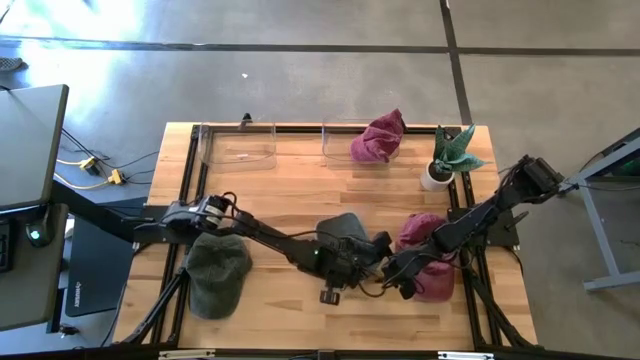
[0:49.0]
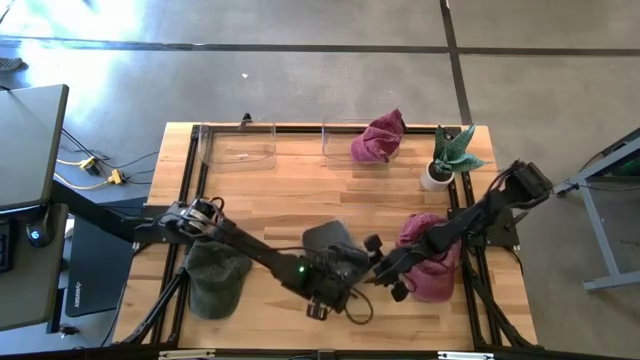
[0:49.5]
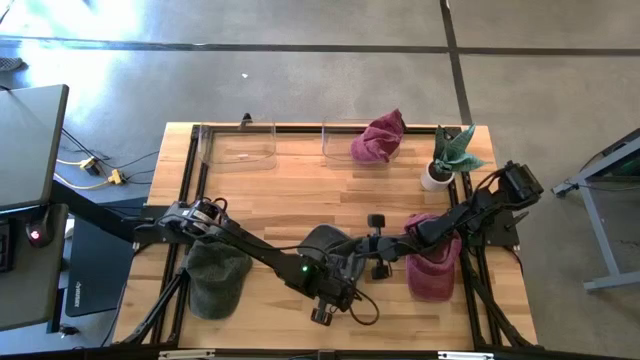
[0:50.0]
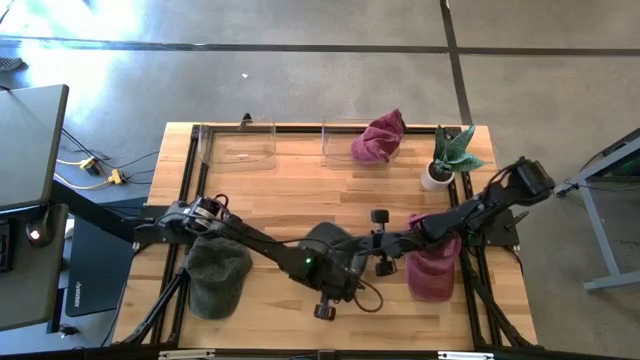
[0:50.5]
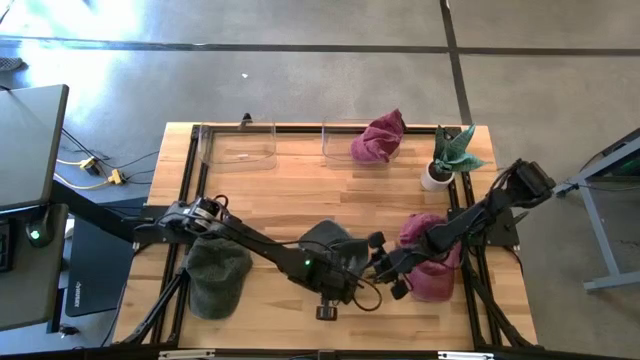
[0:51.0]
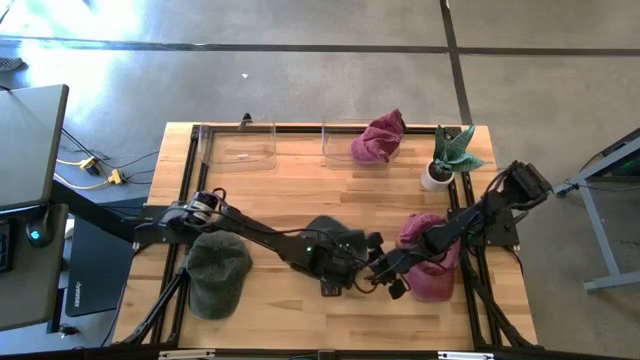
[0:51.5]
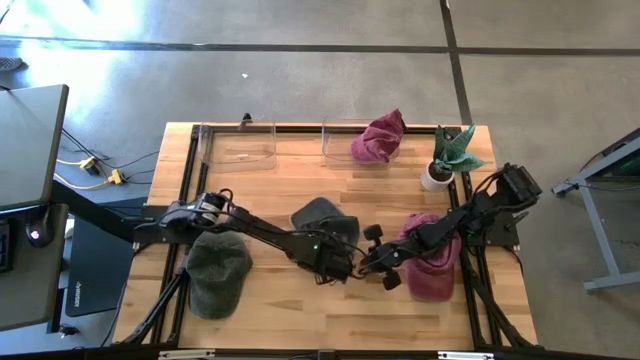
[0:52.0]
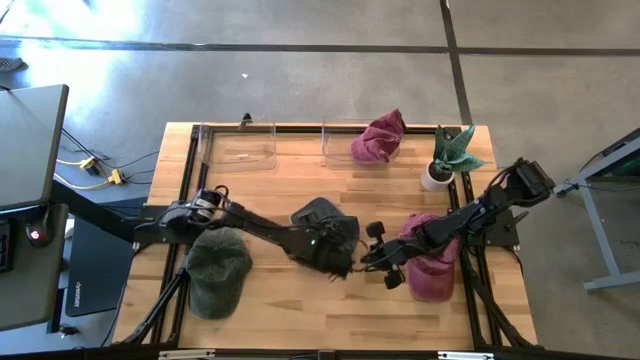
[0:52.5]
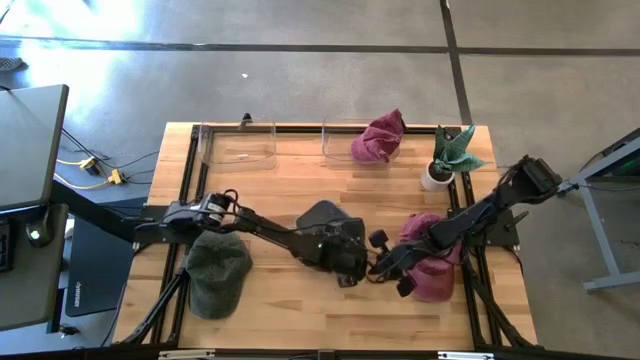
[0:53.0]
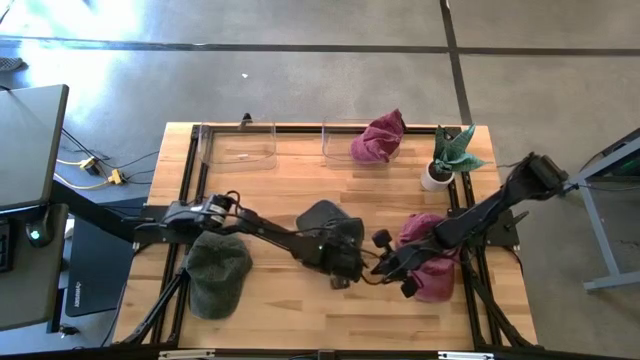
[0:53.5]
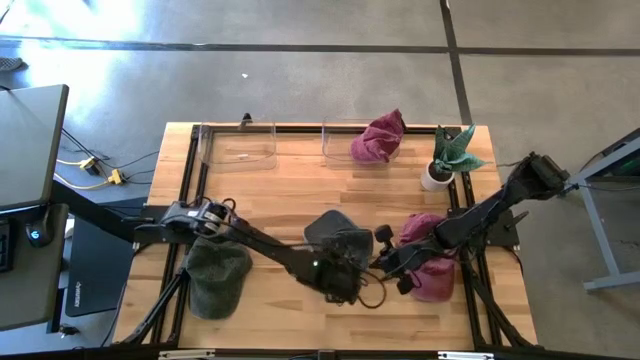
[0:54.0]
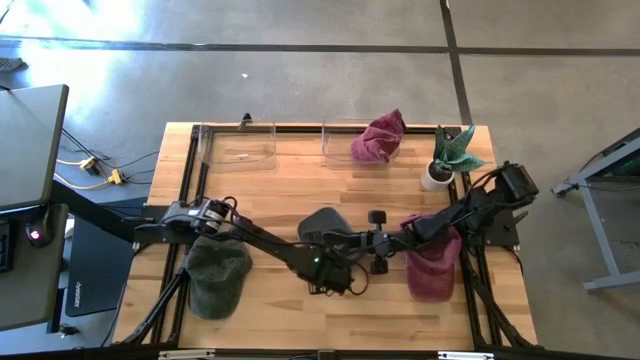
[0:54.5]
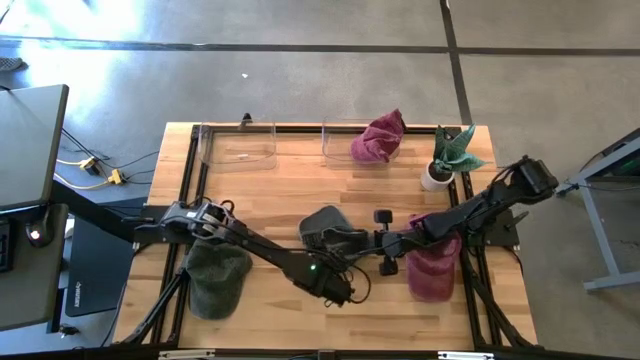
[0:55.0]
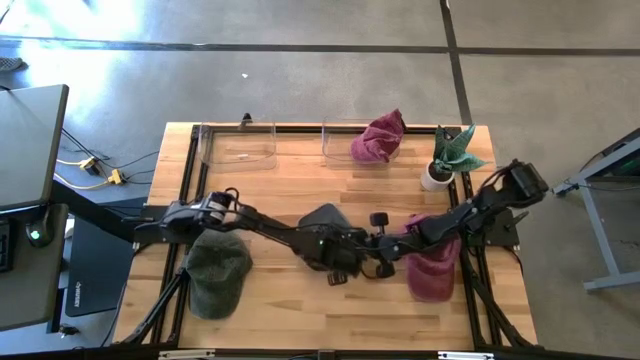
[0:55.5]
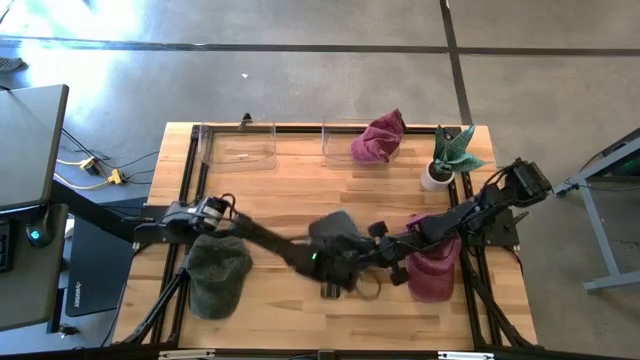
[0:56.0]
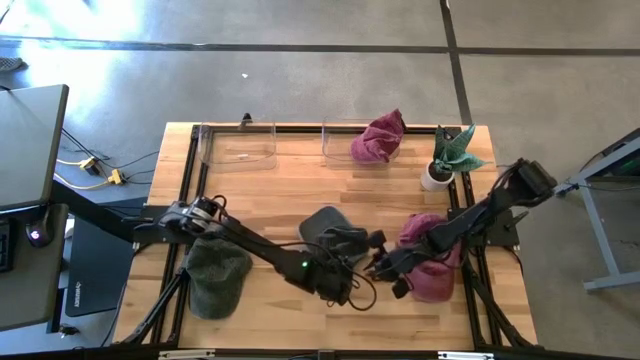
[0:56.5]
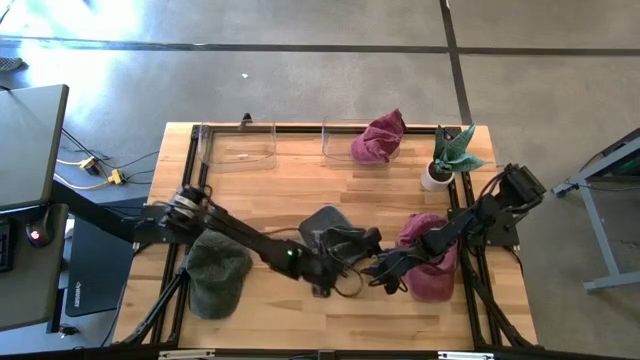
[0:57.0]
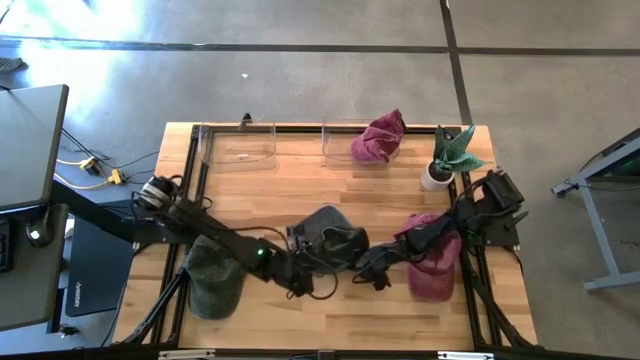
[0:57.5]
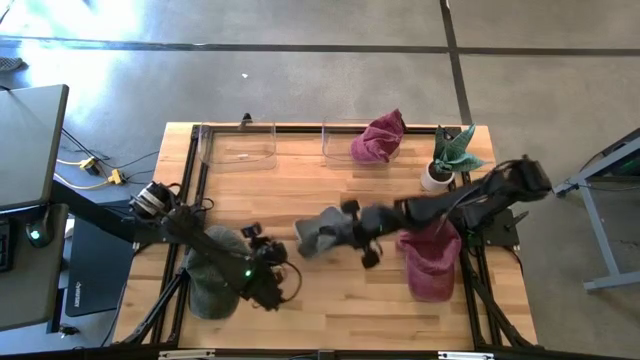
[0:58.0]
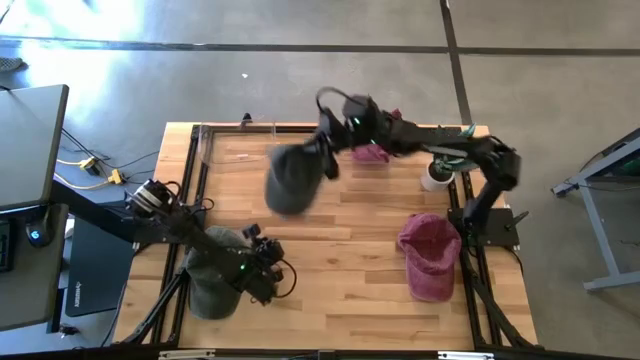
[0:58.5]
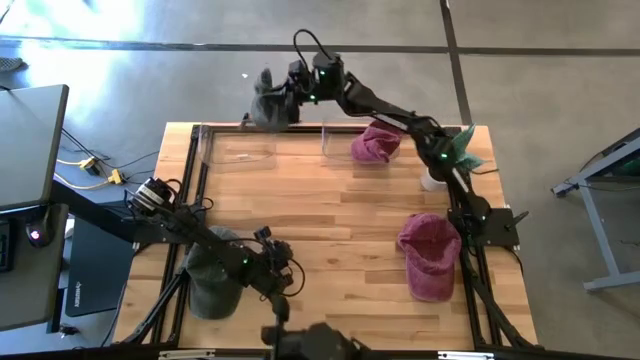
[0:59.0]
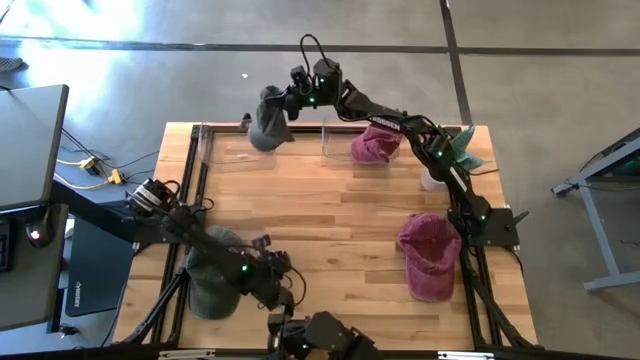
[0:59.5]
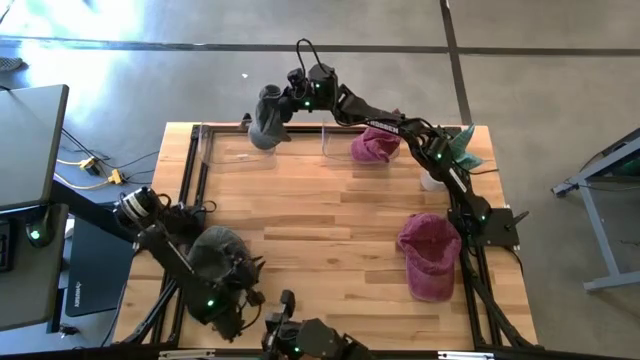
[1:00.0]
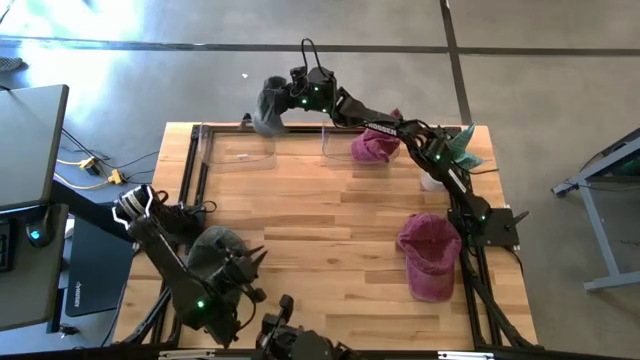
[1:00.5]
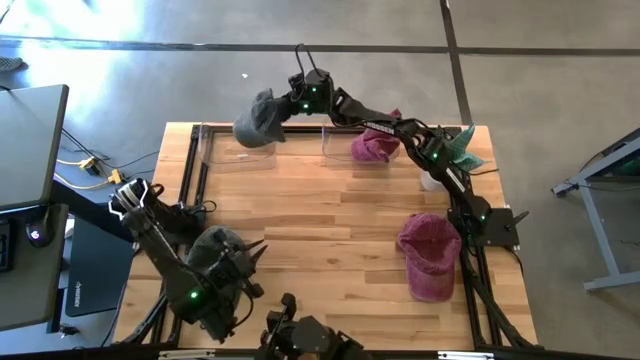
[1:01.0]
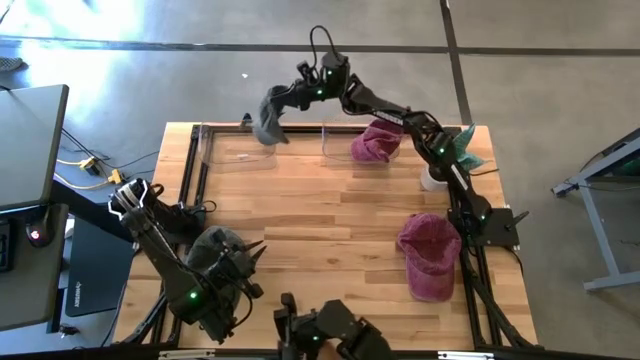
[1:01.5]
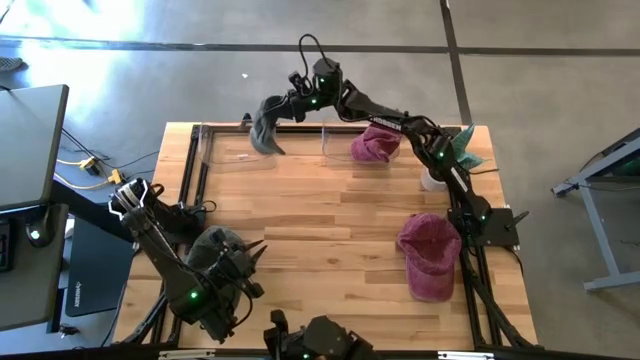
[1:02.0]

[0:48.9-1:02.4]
Task: Pick & Place hat
Put the right black cap into the left transparent bin

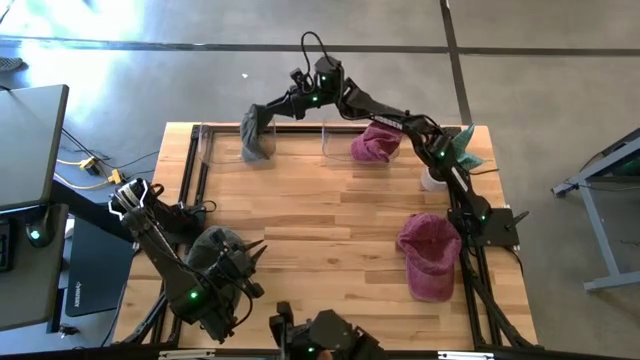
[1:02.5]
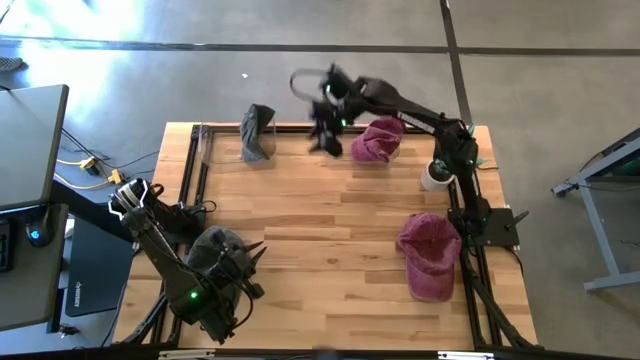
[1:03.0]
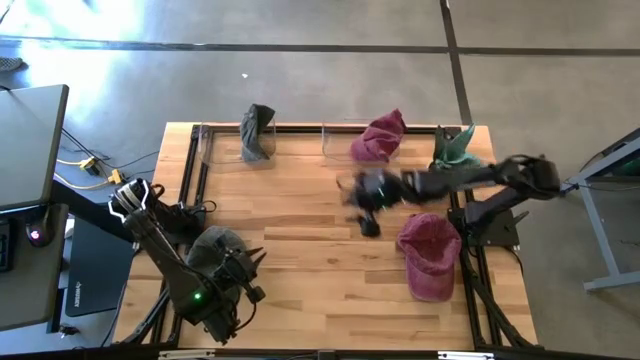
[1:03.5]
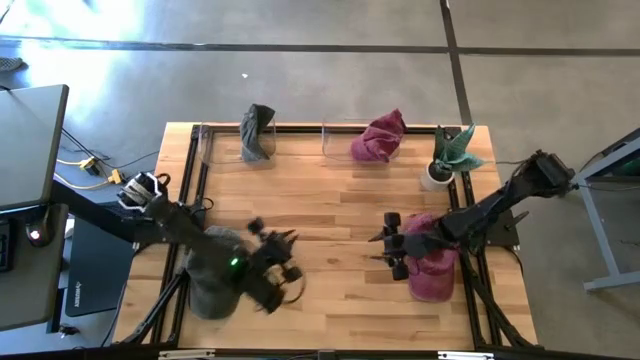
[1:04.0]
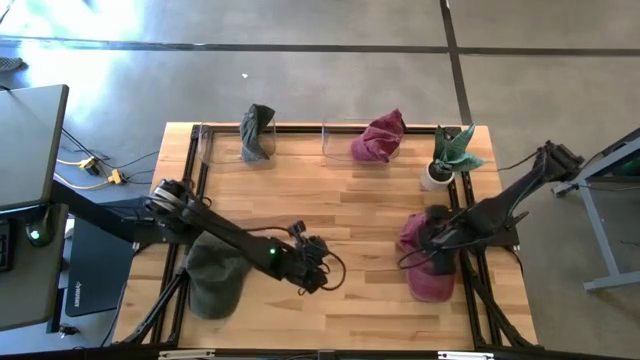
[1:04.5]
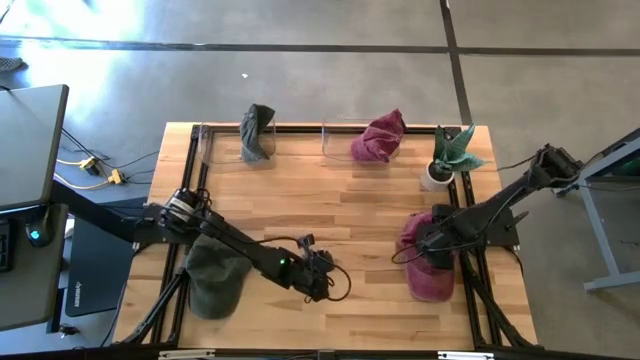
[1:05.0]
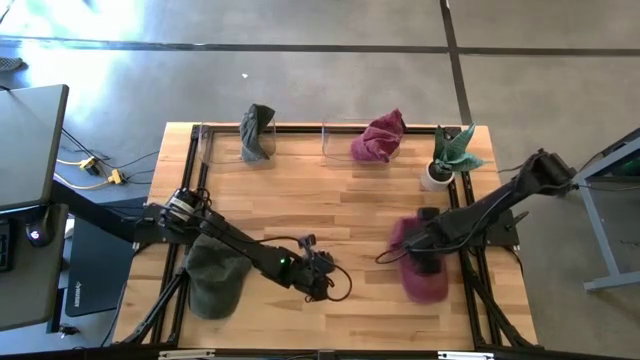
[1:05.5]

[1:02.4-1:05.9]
Put the red cap into the left transparent bin

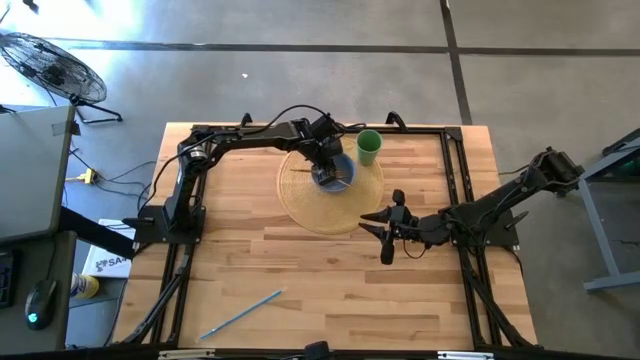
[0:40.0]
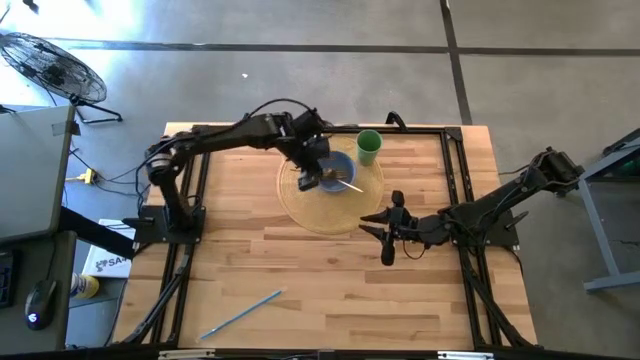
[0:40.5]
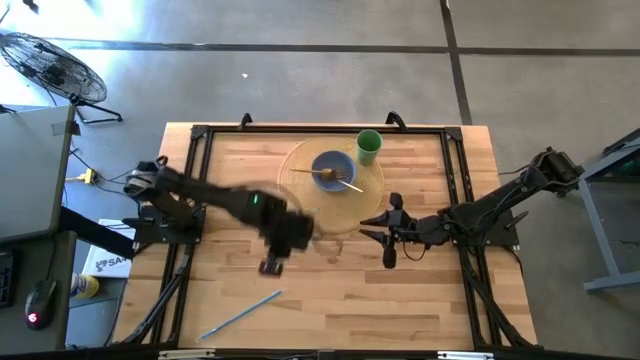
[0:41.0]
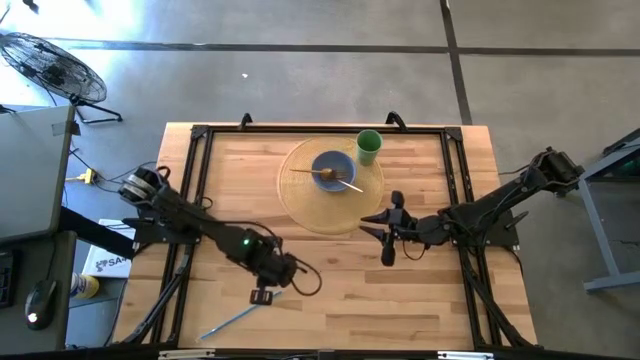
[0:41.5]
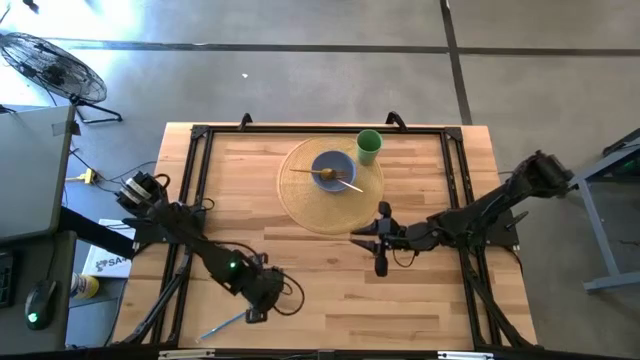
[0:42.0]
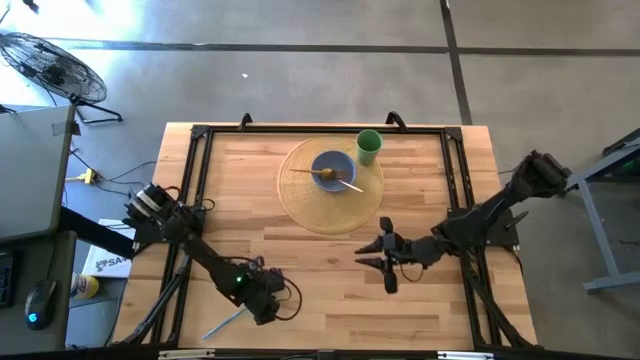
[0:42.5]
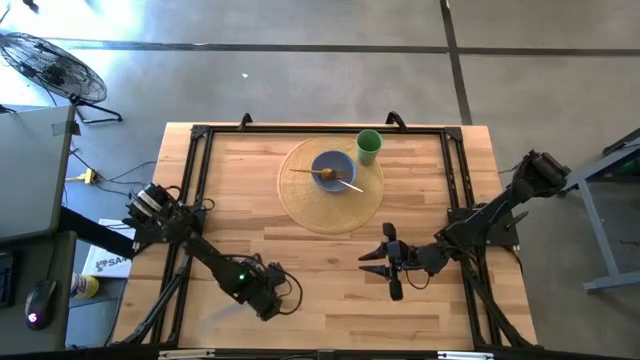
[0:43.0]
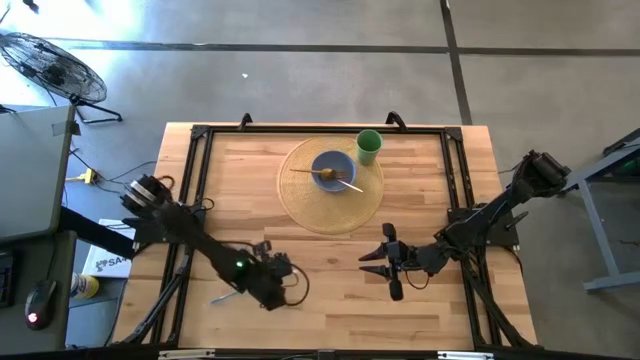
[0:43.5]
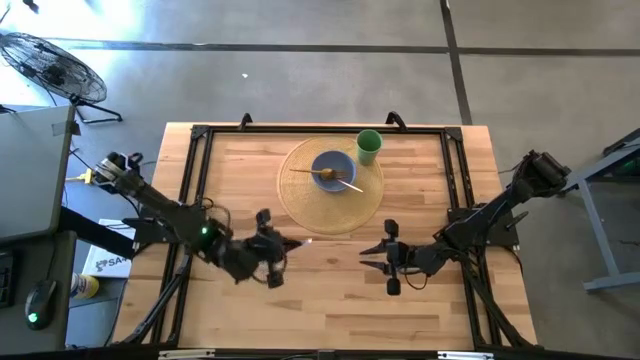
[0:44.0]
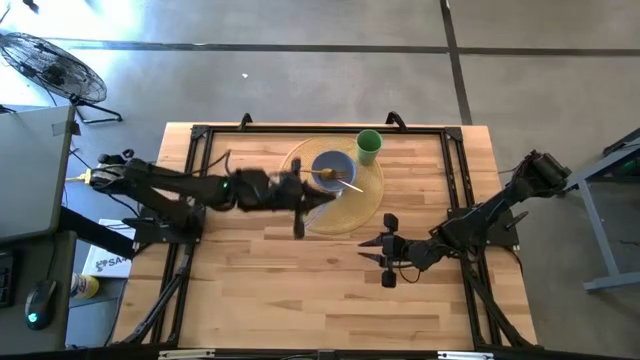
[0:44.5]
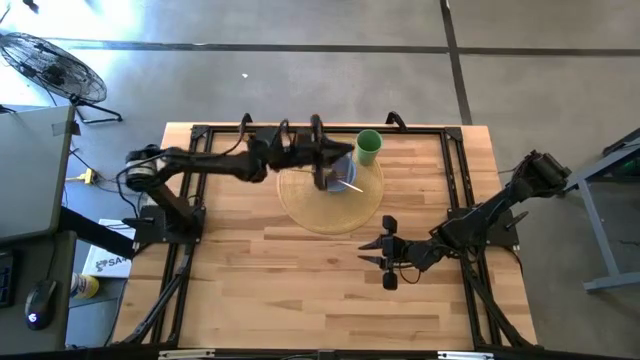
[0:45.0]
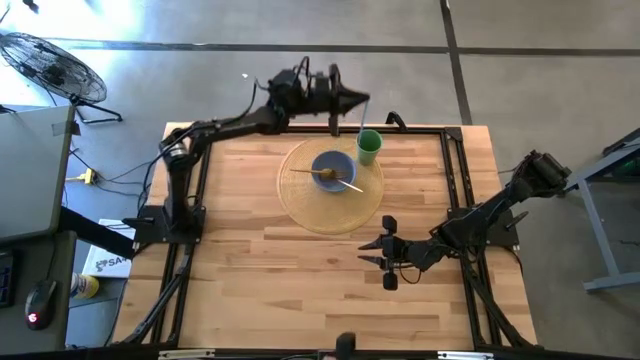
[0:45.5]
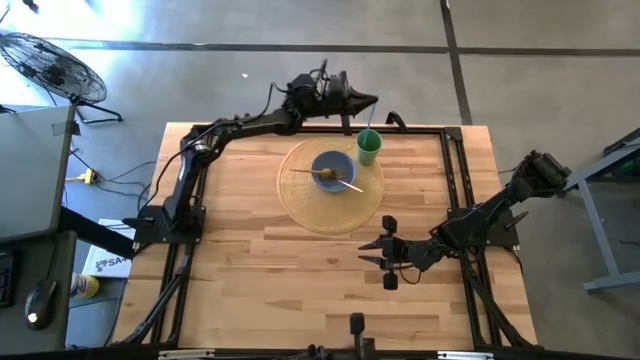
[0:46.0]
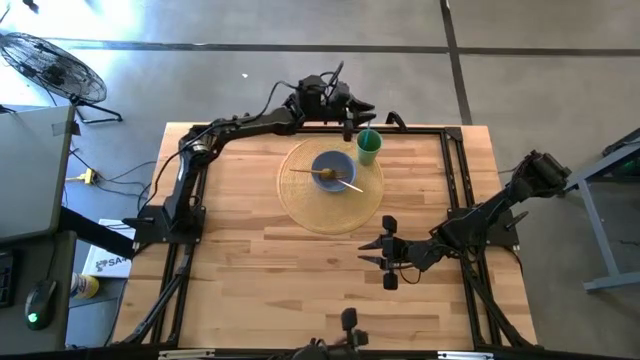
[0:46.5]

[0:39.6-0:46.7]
Task: Pick & Place Utensil
Put the blue straw into the green cup
